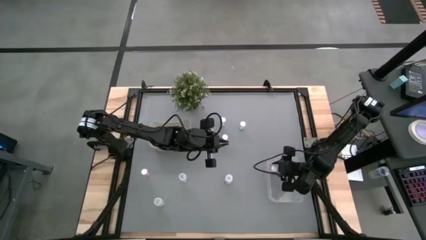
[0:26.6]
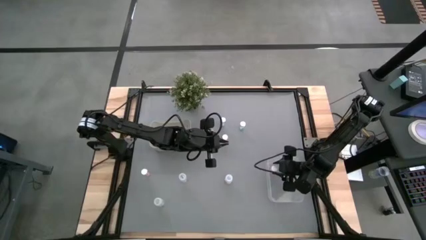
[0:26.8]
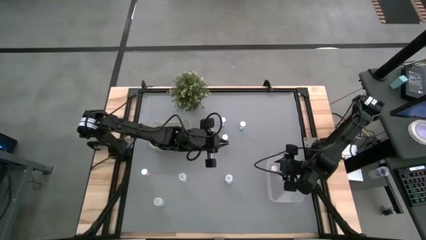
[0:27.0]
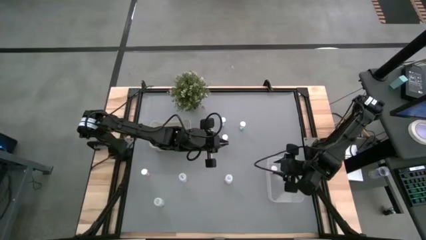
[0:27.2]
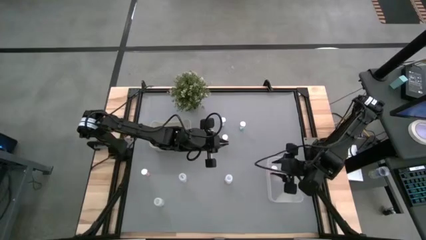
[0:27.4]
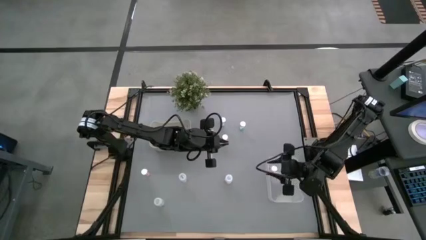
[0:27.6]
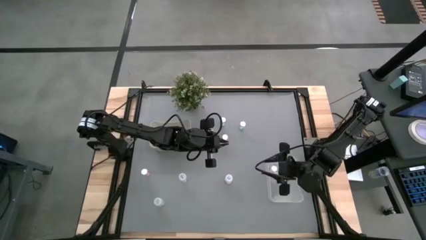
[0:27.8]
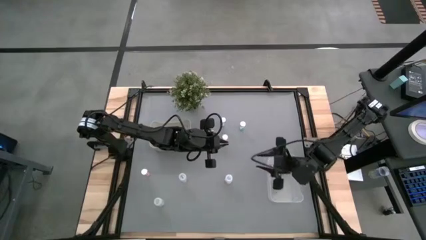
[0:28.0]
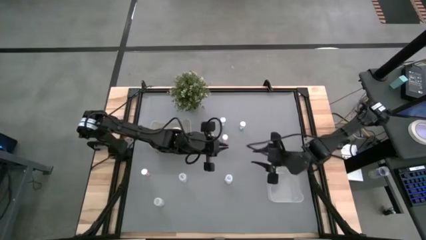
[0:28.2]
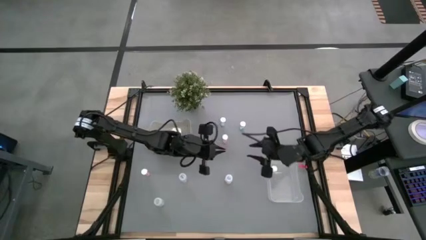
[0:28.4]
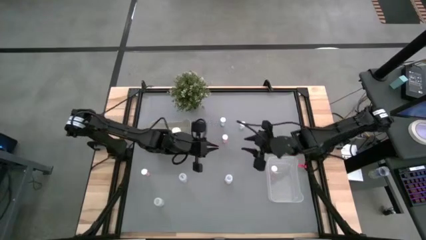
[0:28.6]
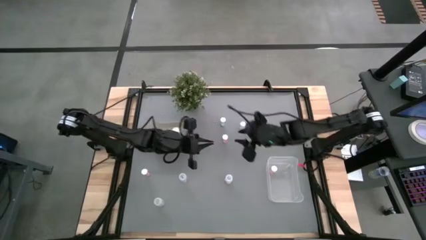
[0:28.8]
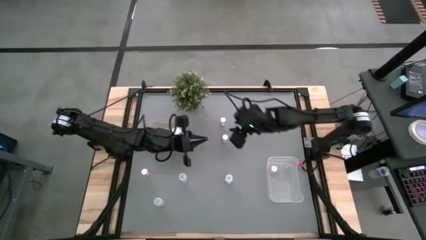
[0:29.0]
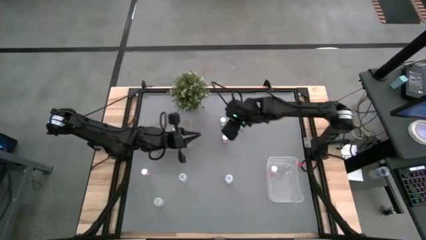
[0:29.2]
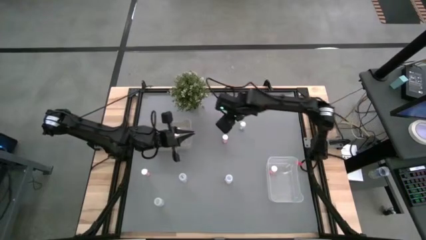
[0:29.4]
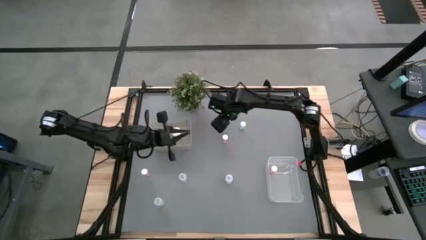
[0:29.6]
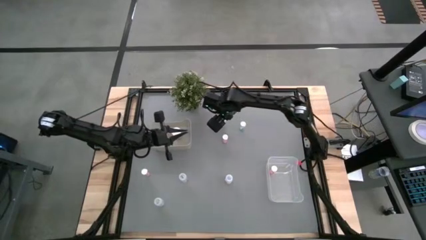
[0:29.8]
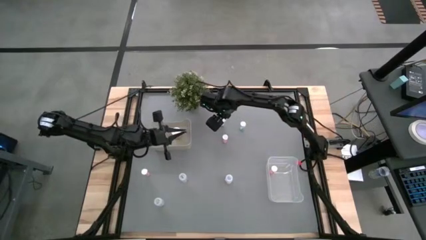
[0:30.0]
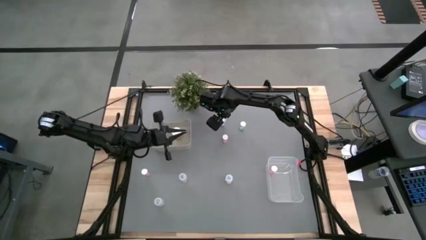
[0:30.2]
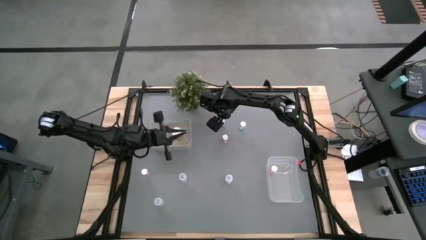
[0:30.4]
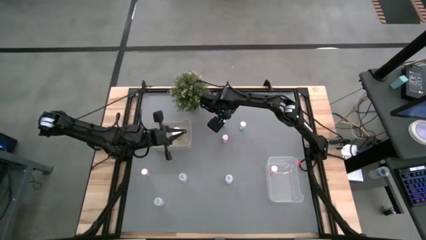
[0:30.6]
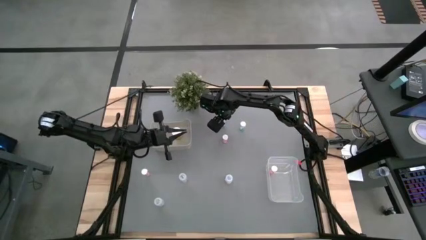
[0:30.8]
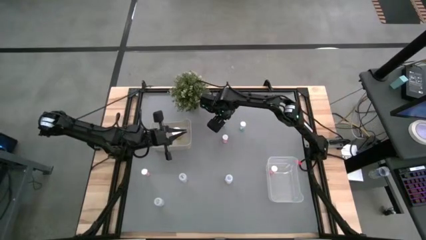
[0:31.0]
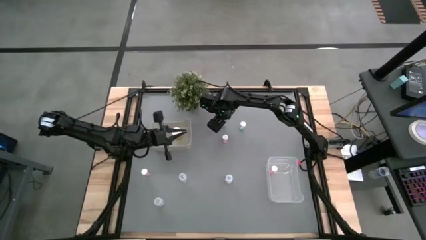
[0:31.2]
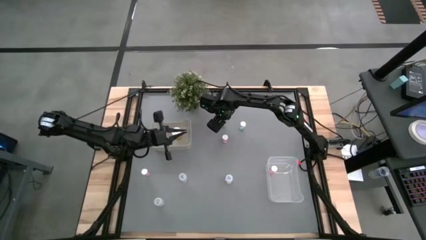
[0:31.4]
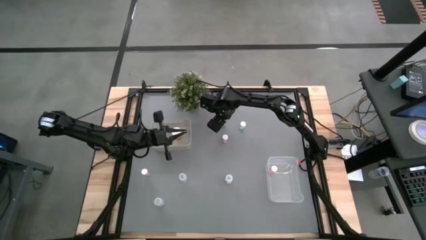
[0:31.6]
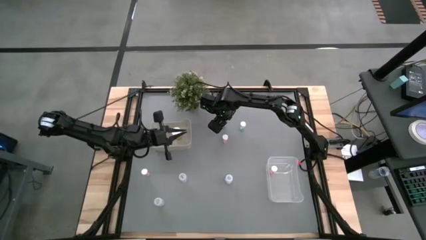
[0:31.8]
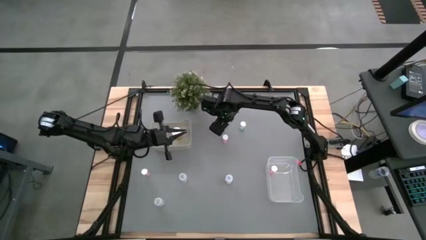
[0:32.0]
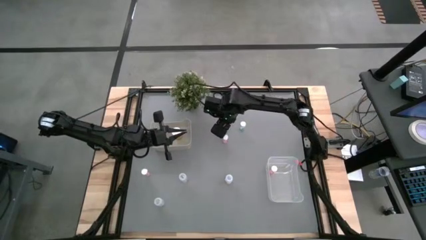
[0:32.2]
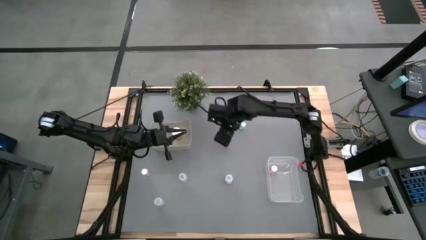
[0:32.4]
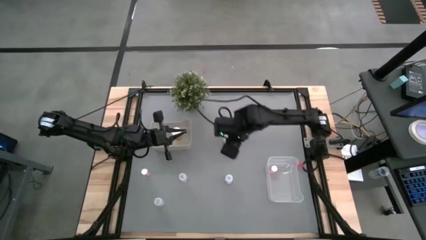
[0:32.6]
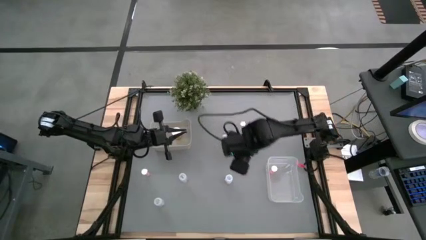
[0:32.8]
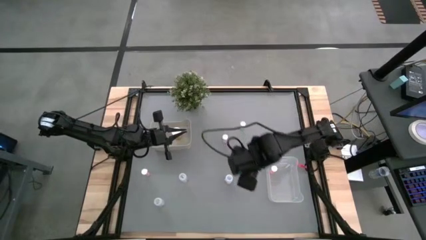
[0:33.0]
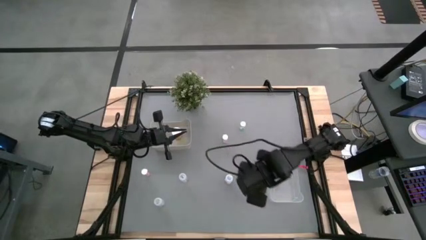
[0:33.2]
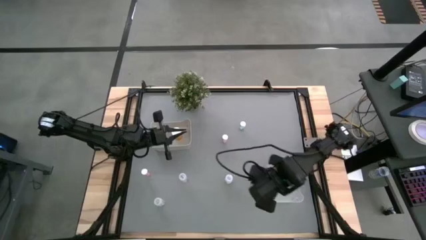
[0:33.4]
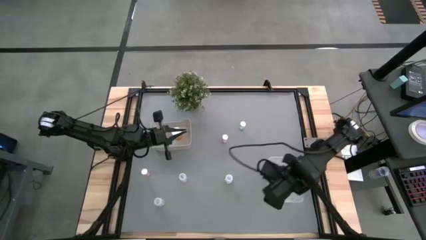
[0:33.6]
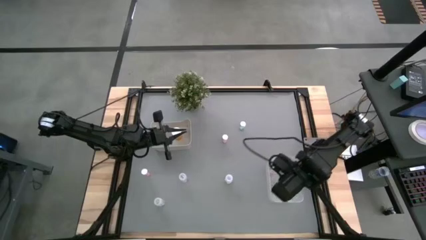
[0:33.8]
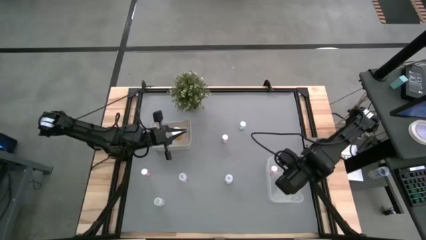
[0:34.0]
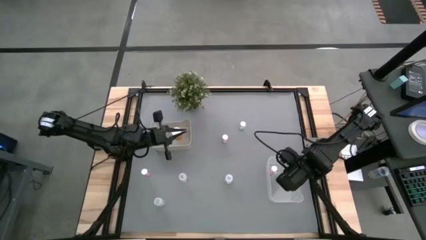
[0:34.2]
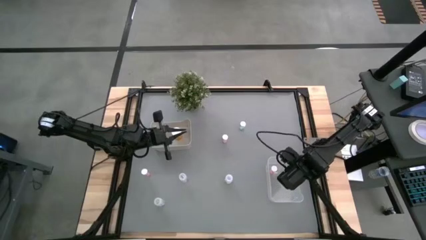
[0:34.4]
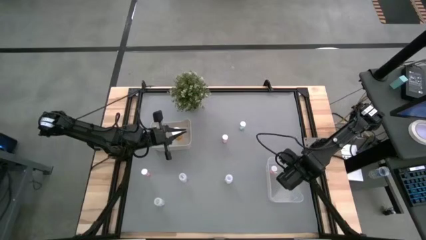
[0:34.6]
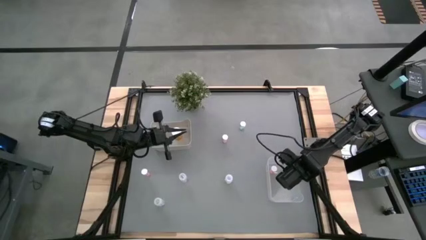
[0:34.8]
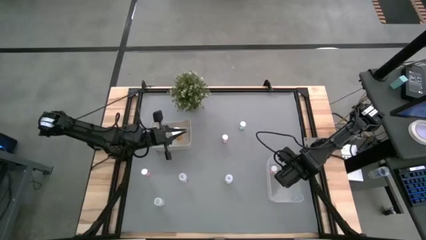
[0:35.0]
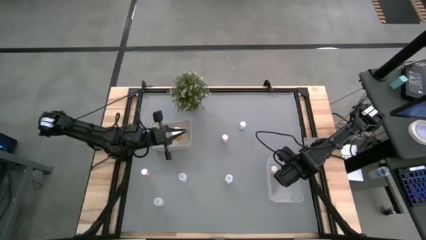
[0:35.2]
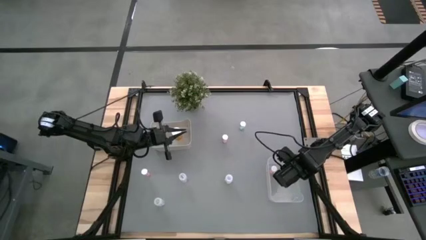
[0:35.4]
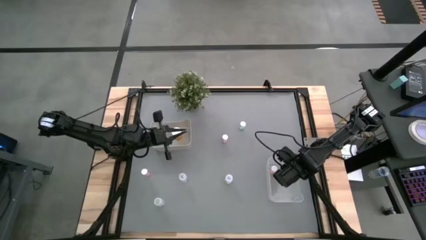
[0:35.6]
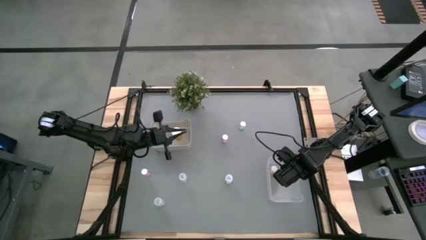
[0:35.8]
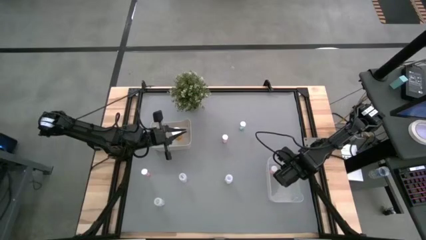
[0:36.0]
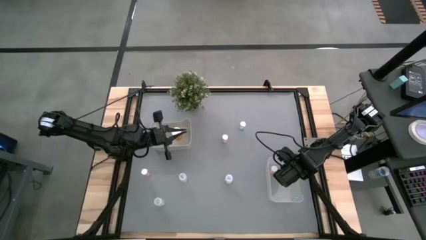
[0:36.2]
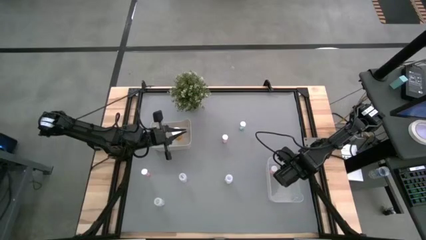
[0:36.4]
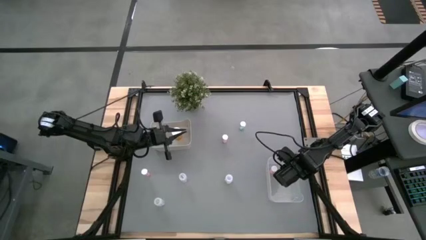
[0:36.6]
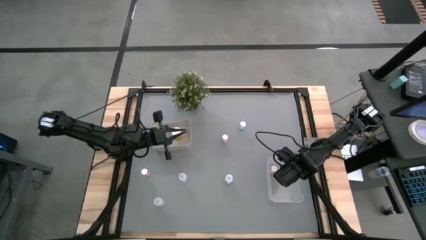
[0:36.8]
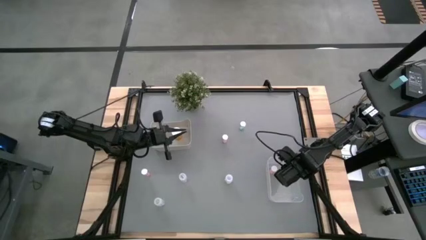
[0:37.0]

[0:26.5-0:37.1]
Task: Pick and place medicine bottles into bin by pill shape (circle, oval)
Put the left blue pill bottle into the transparent bin

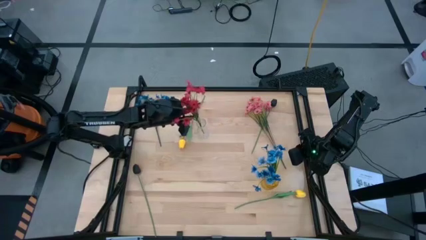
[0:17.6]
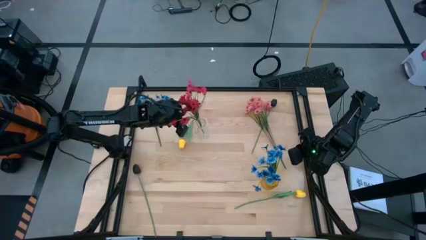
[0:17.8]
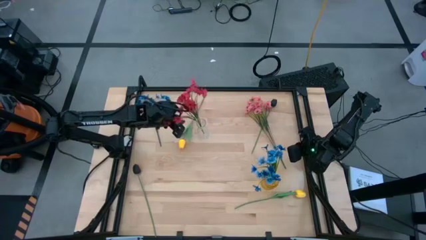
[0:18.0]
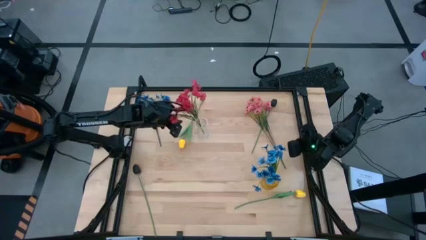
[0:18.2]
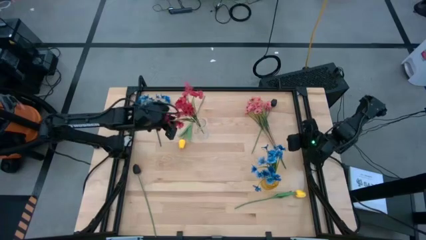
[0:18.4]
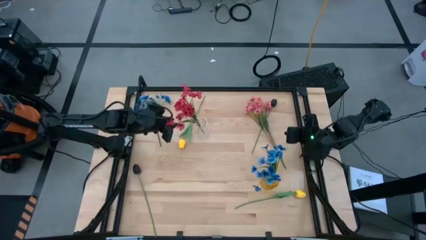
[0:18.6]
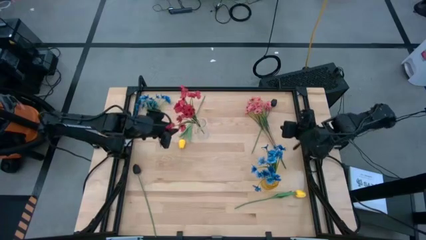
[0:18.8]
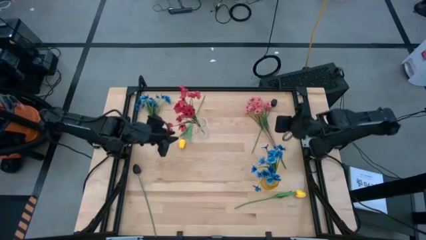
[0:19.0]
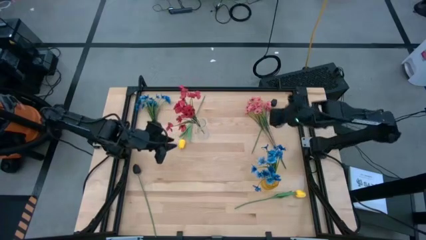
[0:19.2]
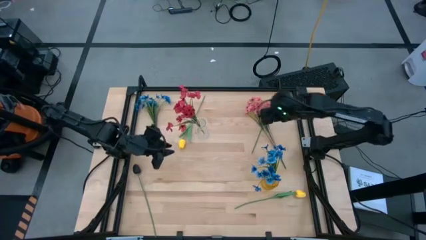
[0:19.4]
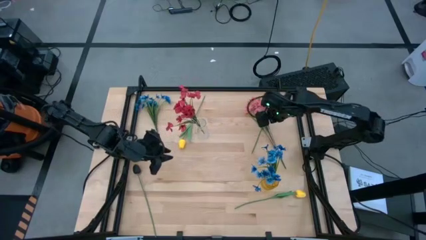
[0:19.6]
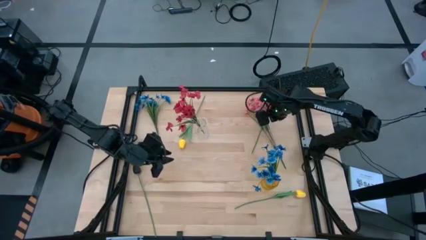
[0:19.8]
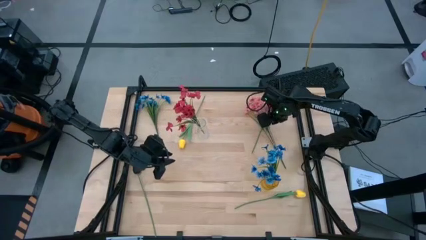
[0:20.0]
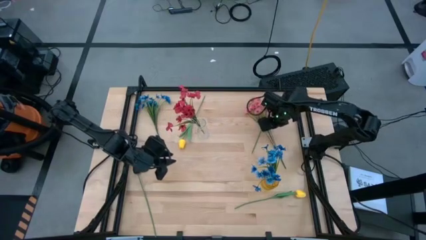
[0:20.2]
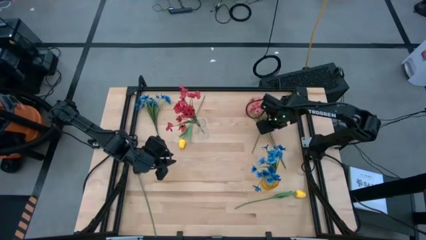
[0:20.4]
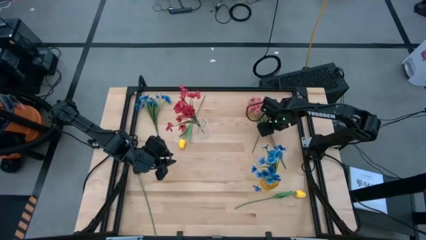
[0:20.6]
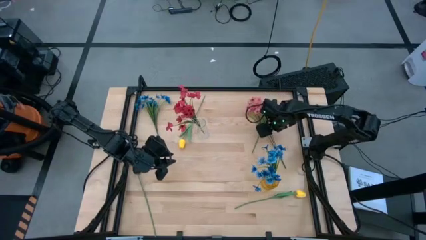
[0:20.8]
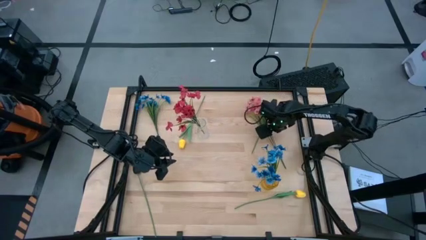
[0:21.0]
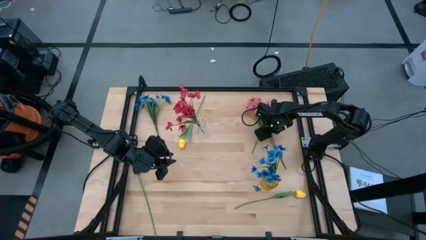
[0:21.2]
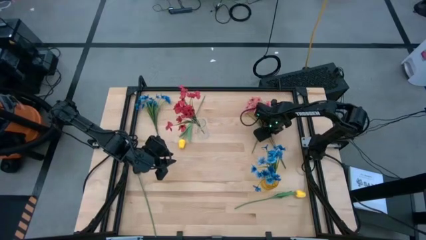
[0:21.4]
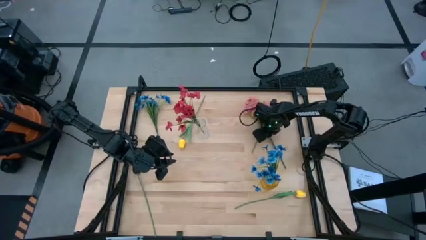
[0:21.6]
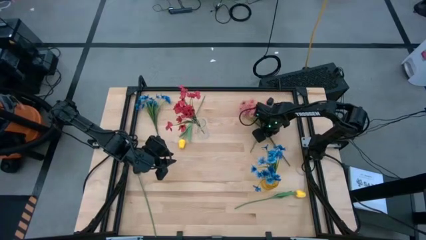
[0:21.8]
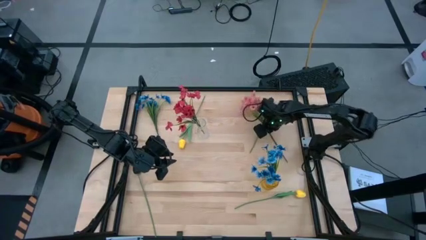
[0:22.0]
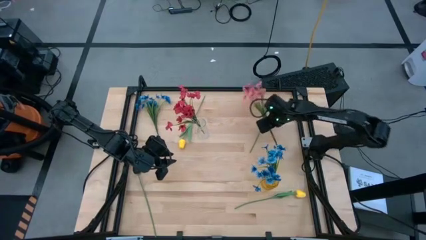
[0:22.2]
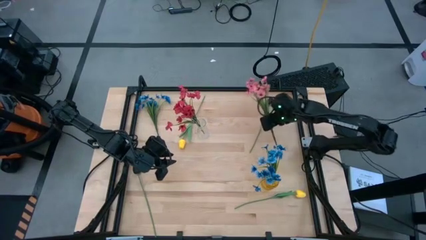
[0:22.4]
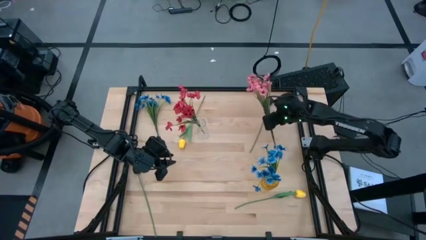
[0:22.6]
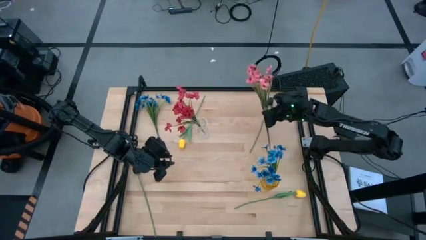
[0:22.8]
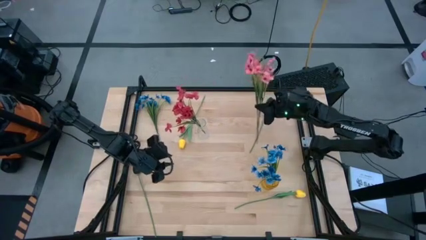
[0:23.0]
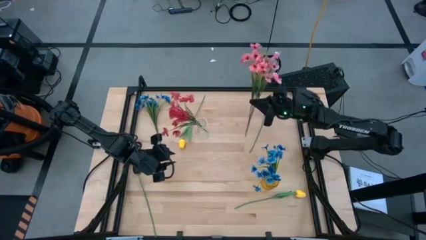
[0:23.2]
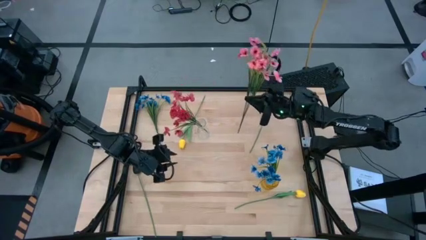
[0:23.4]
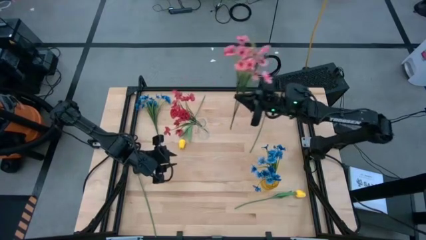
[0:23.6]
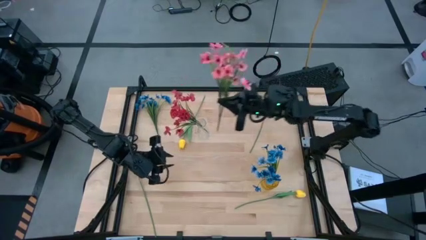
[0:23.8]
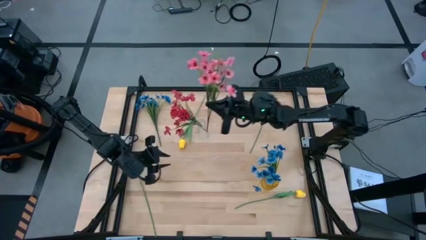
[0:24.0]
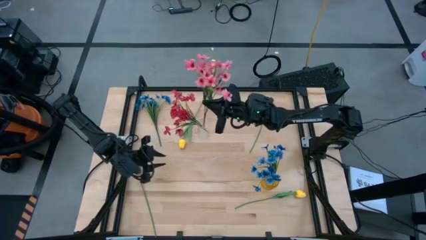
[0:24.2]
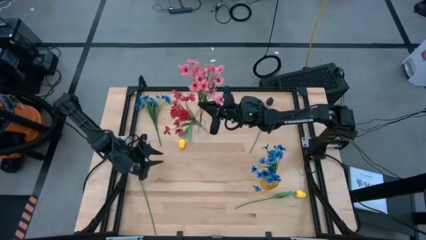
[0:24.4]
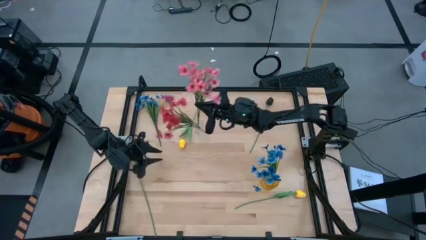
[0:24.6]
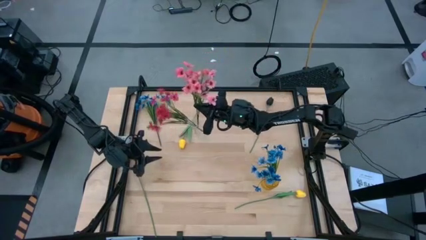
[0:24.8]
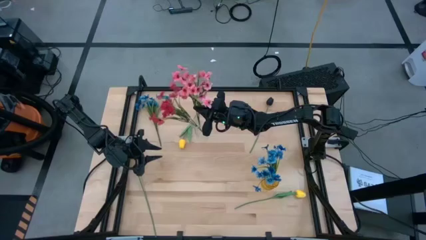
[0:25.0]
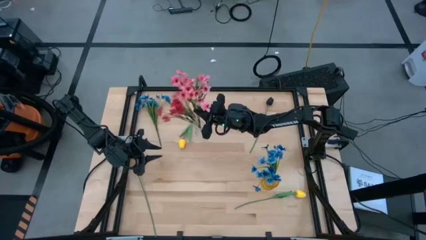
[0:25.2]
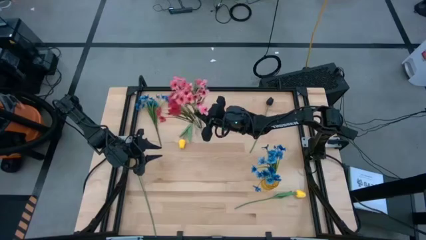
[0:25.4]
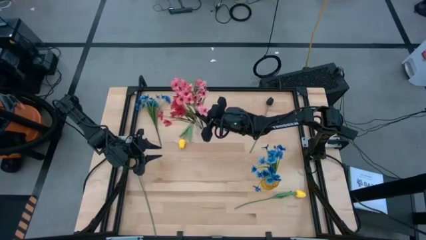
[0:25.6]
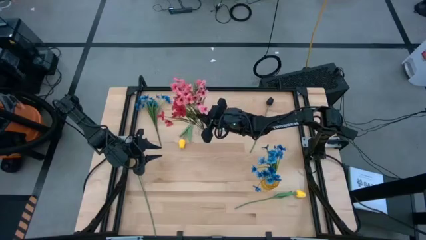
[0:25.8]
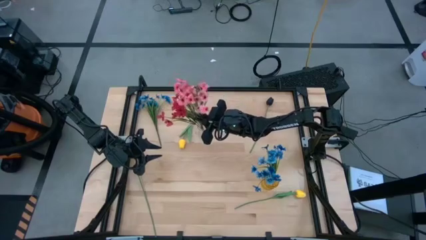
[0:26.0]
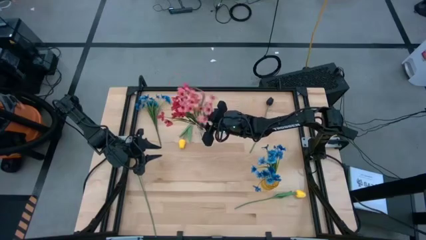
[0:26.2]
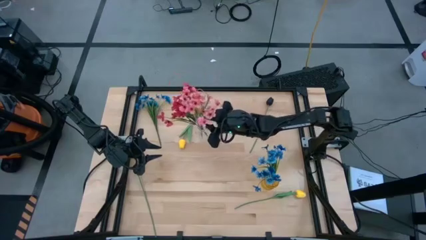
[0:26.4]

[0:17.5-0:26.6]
Task: Sort flowers into vase by color
Put the pink flower into the transparent vase
